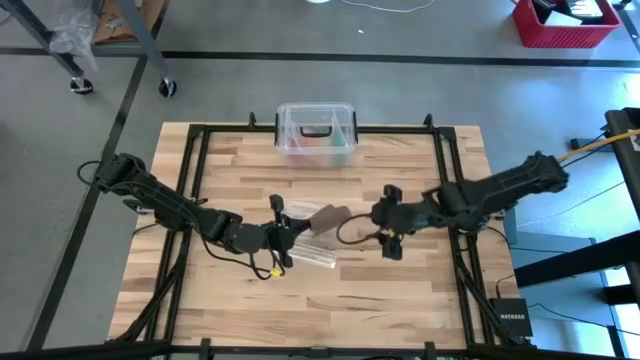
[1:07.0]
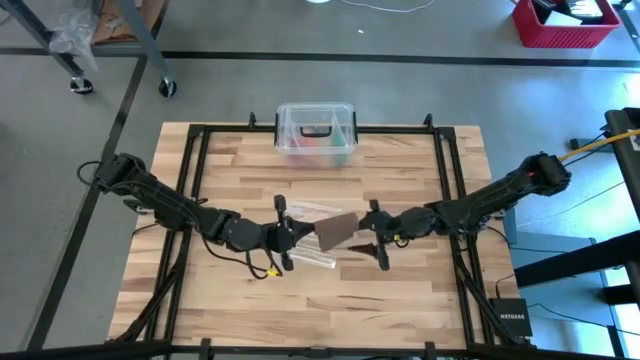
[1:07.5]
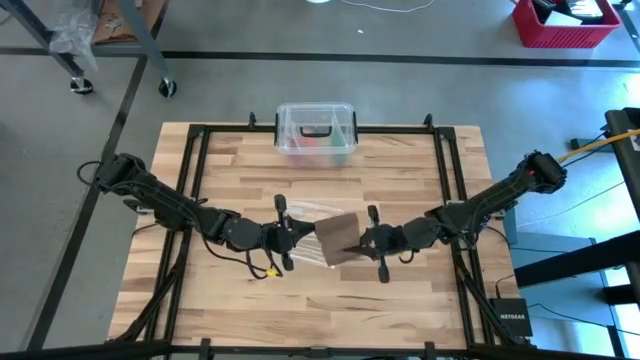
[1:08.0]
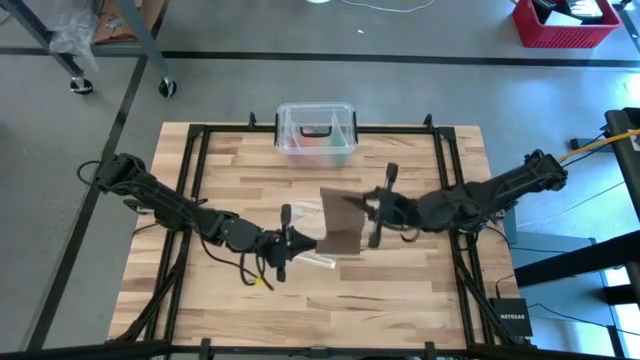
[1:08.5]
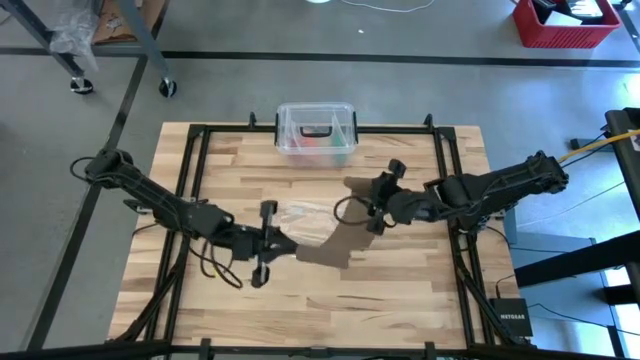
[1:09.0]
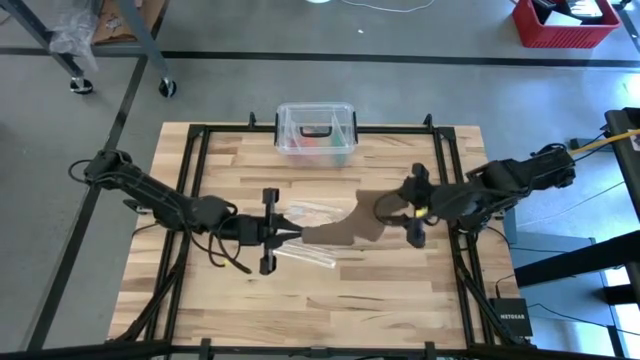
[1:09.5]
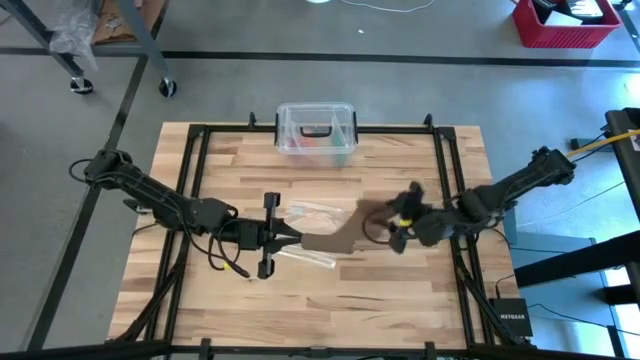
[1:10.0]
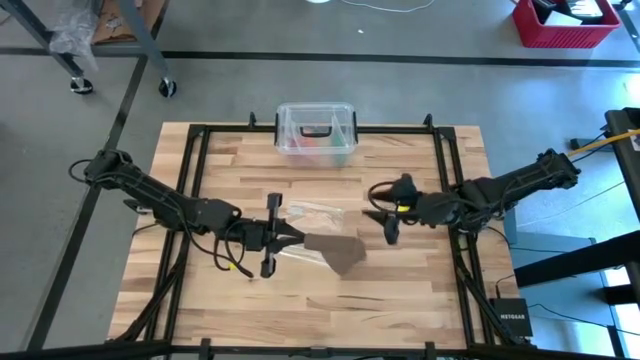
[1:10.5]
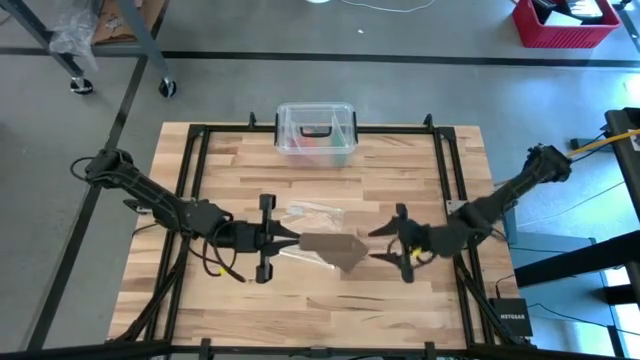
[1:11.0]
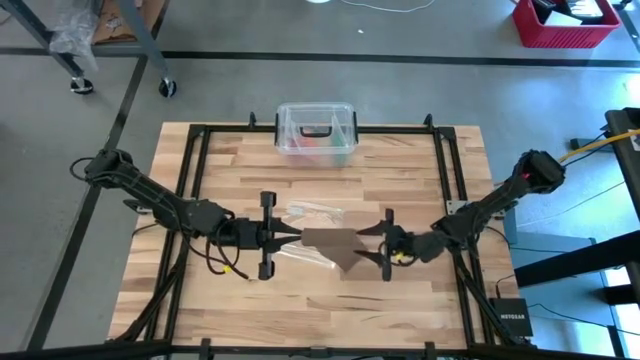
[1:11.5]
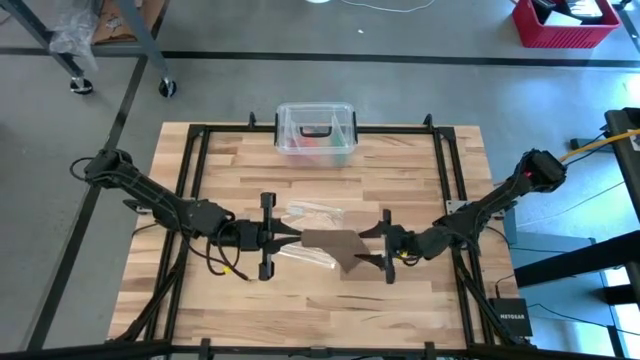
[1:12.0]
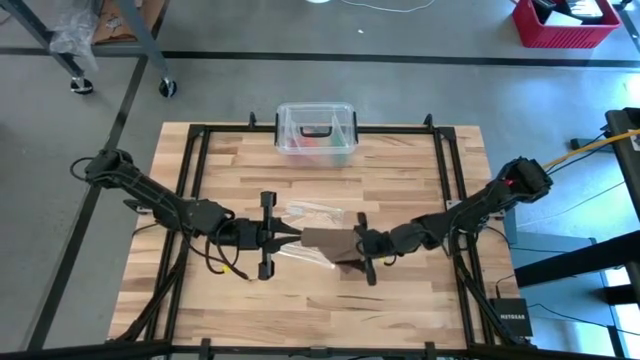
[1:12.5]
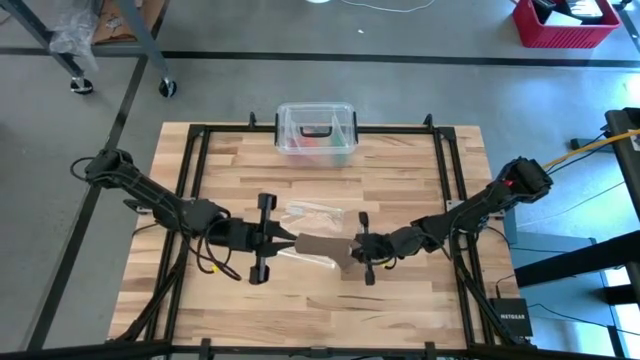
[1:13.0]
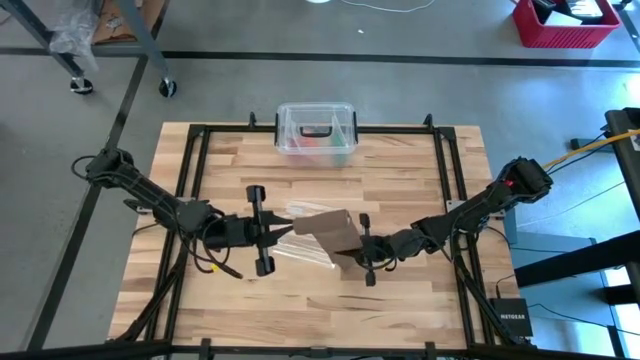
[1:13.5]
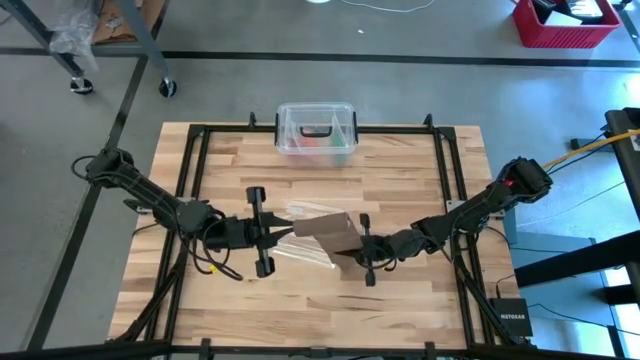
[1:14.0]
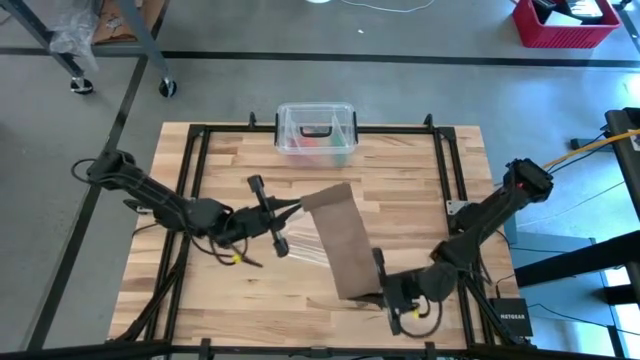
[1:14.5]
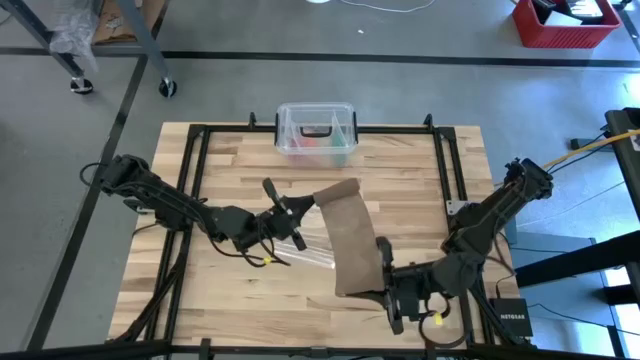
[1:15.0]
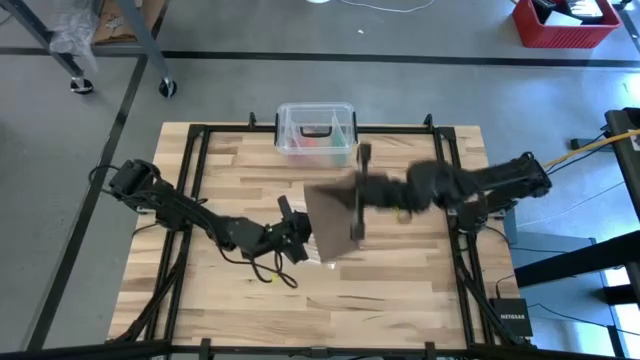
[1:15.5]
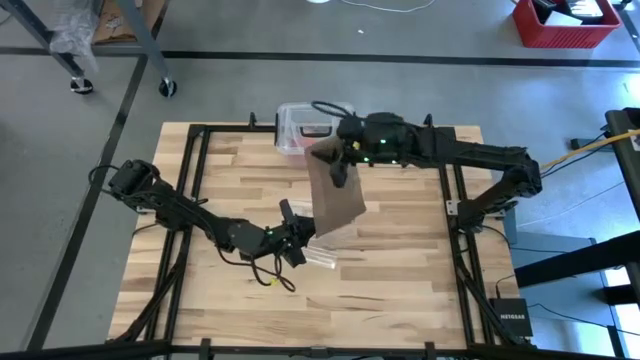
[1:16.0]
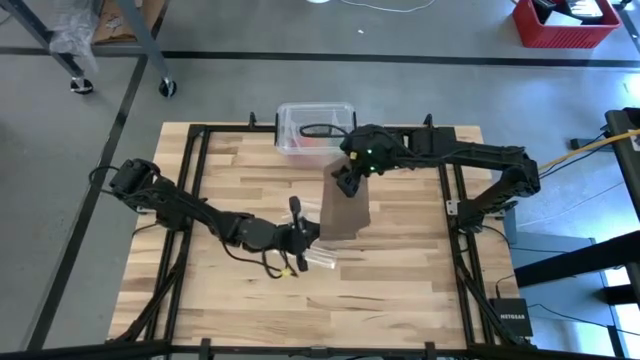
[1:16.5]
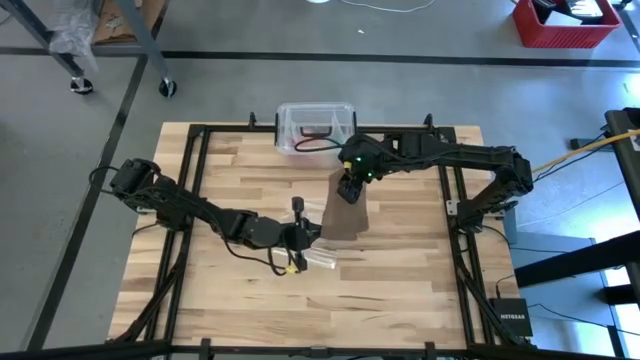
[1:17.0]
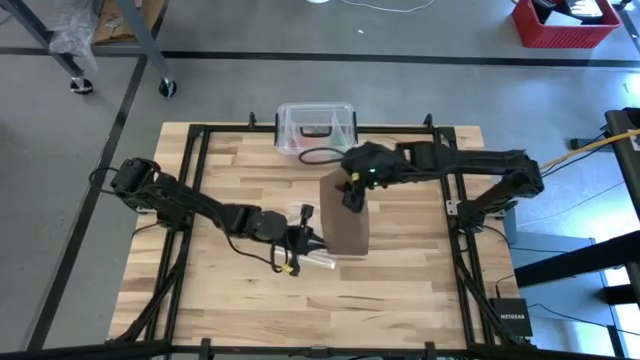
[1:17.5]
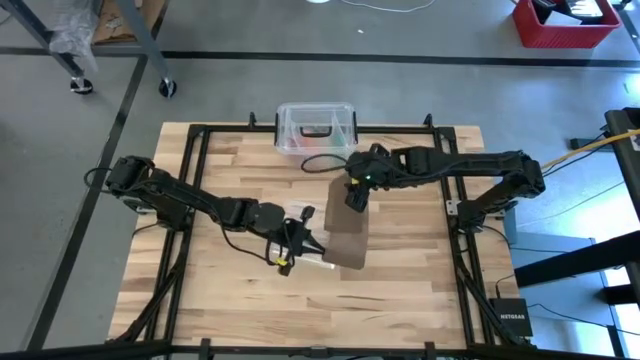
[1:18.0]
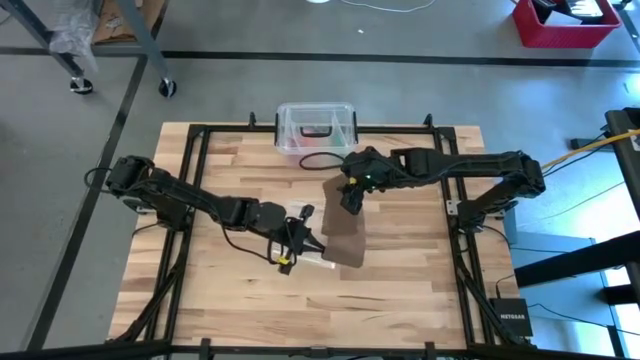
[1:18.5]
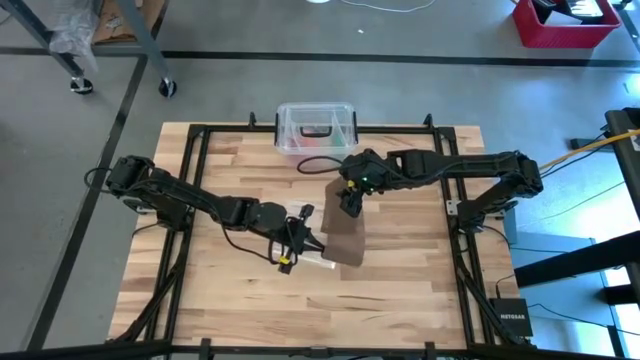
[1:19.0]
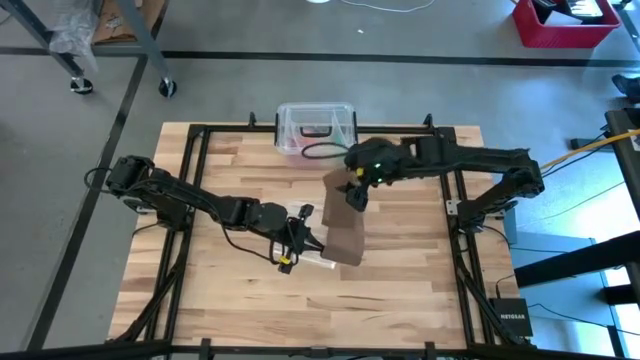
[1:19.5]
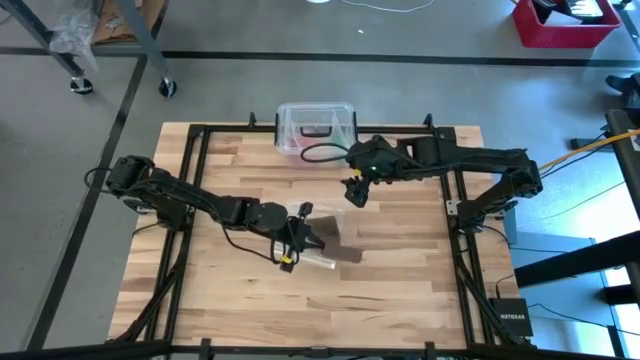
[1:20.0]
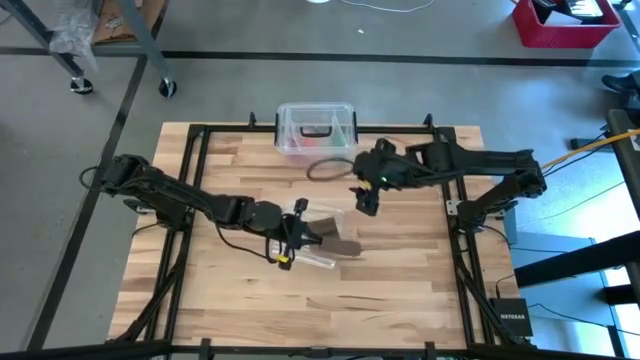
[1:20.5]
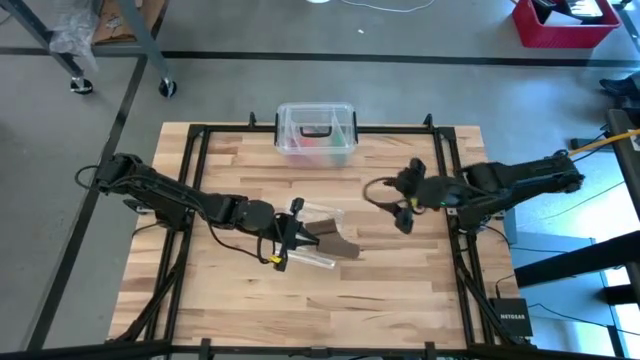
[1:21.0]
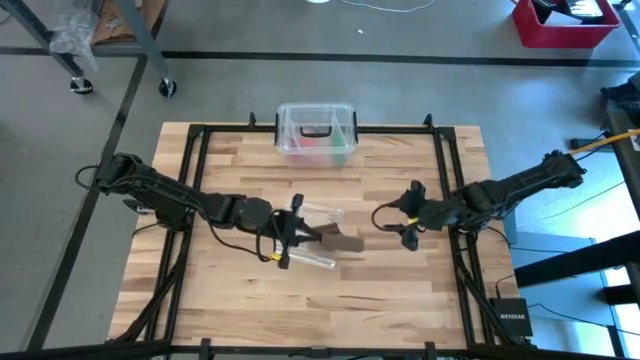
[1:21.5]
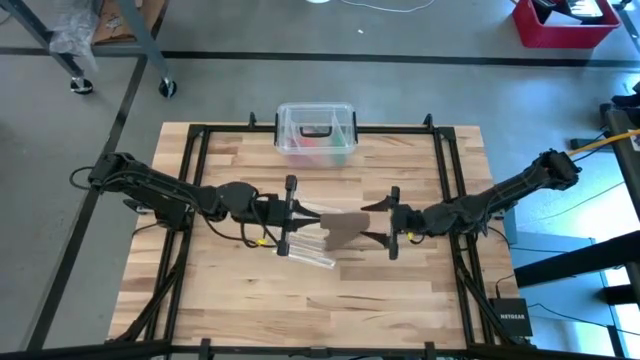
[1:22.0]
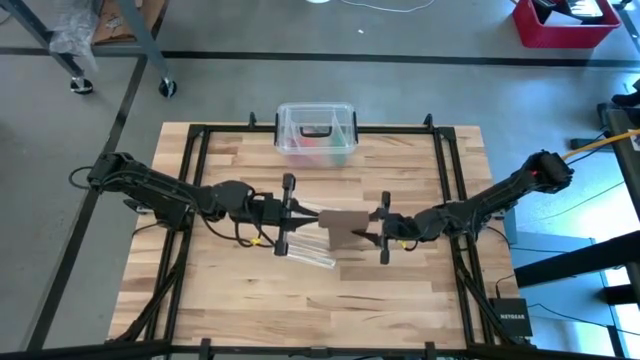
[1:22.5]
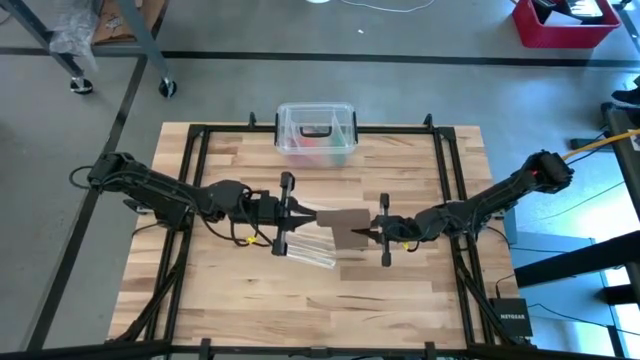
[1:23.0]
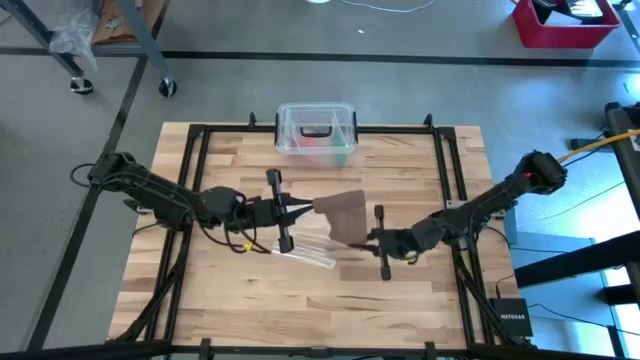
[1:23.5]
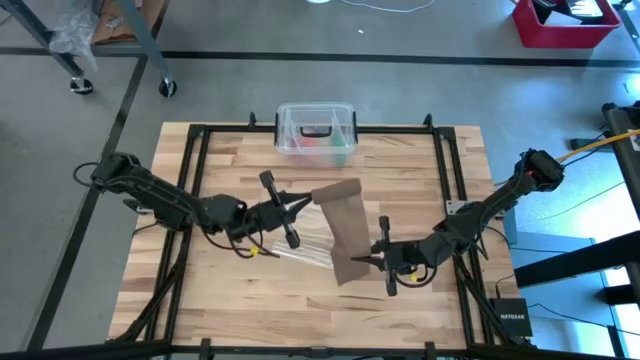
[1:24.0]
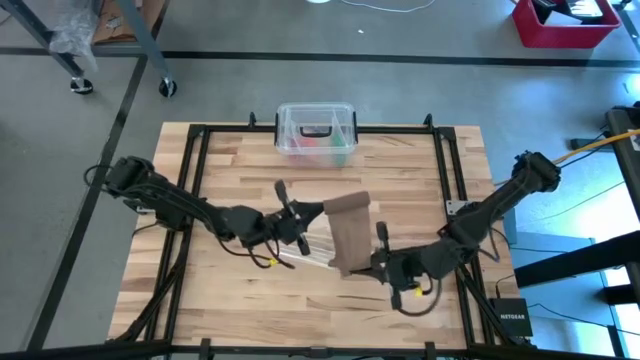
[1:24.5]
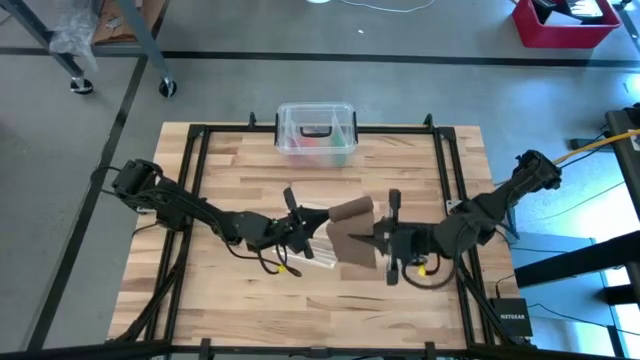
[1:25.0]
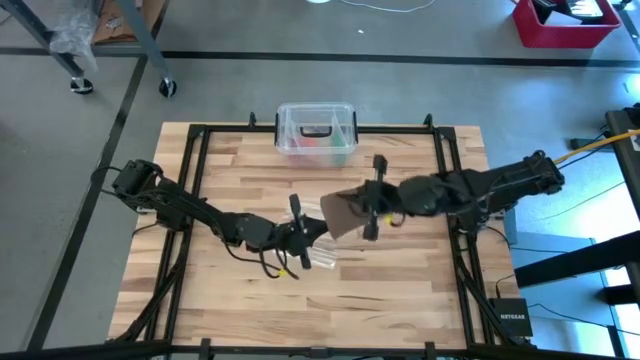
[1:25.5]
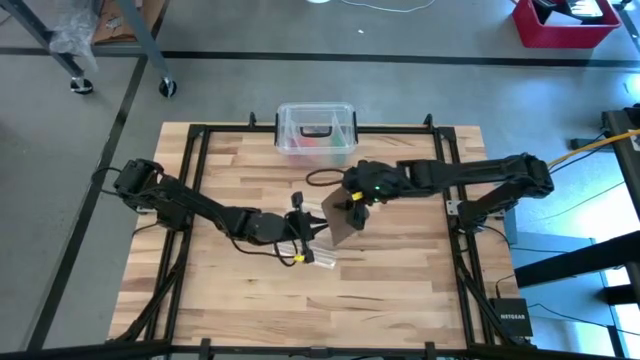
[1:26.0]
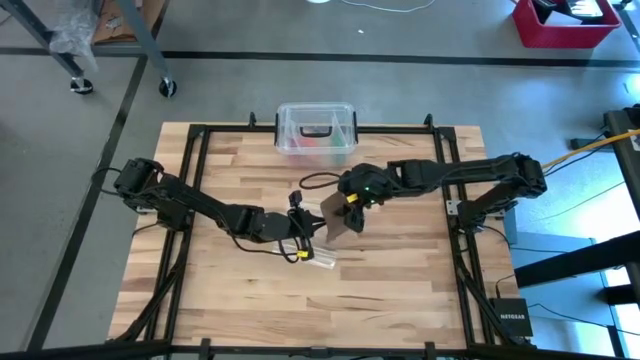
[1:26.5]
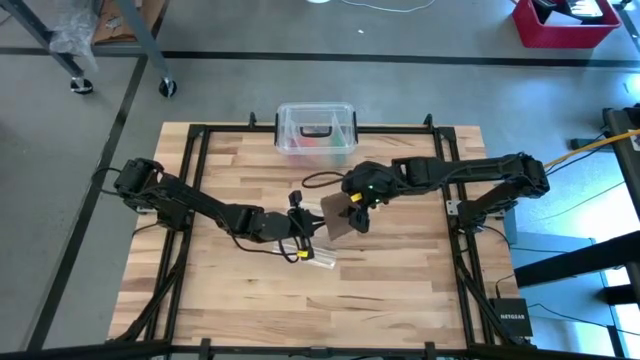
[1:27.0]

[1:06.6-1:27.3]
Task: Roll bandage
Roll the brown bandage

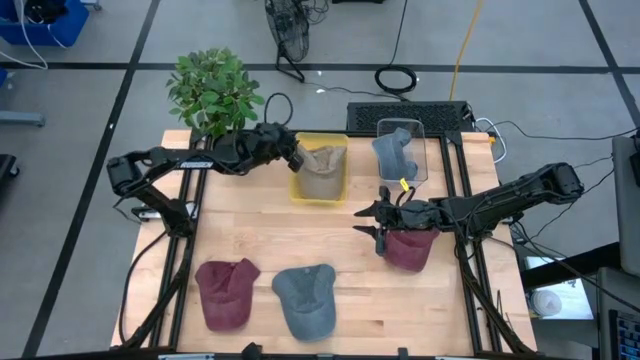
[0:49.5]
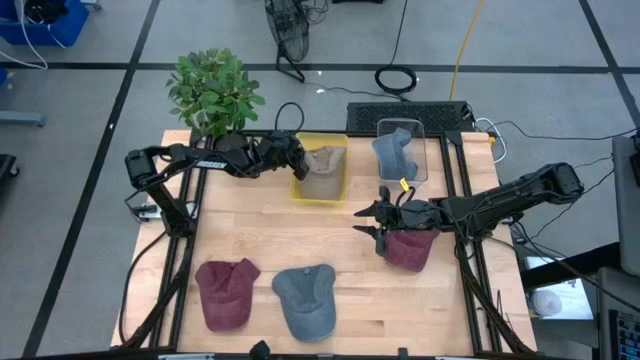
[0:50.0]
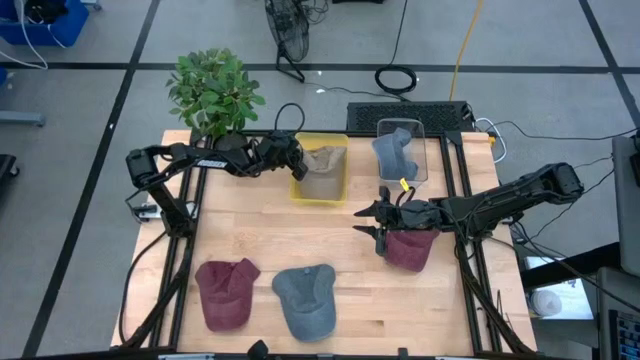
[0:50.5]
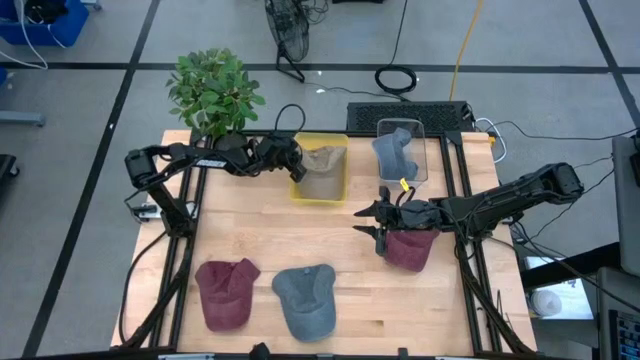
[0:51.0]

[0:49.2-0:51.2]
Task: Pick & Place hat
Adjust the light brown cap on the yellow bin
